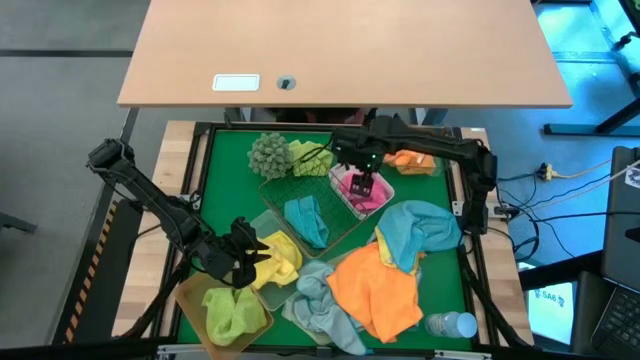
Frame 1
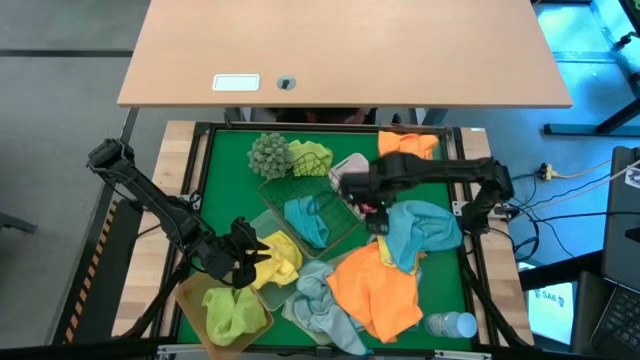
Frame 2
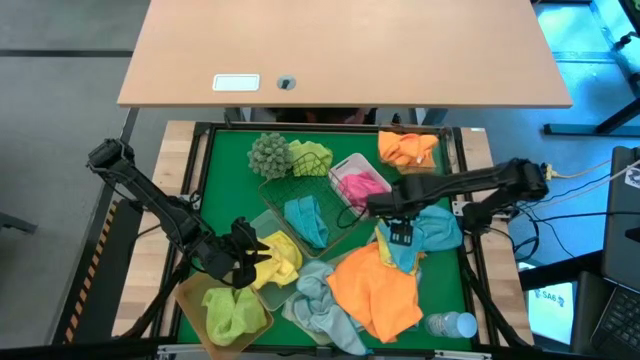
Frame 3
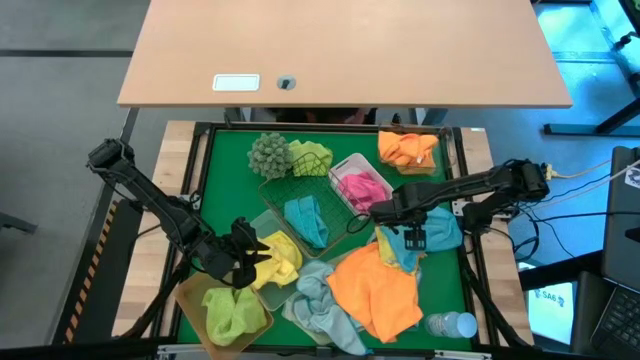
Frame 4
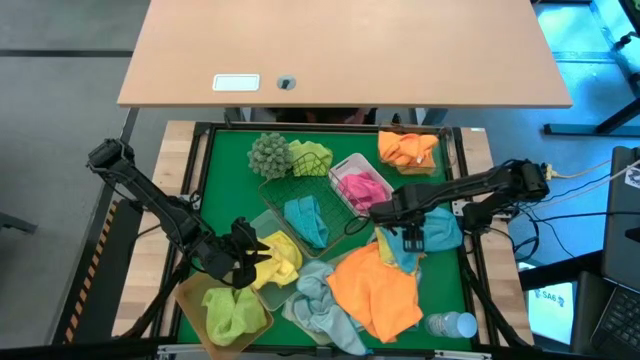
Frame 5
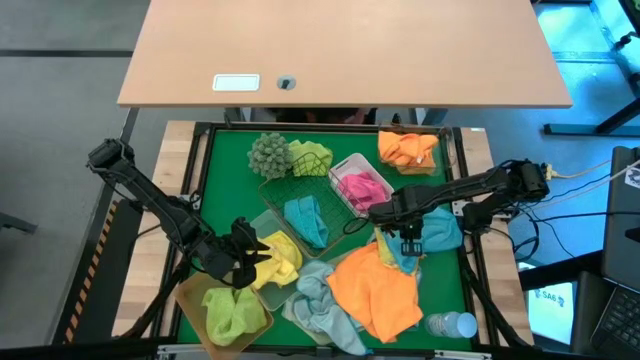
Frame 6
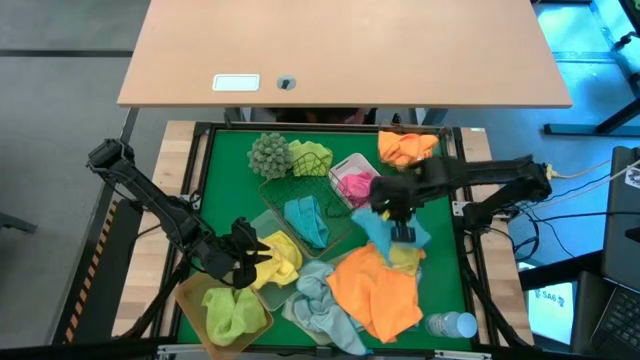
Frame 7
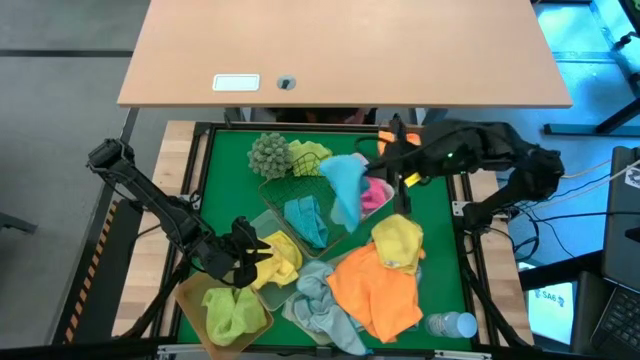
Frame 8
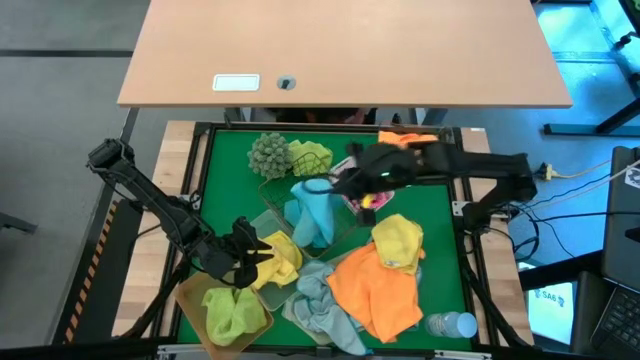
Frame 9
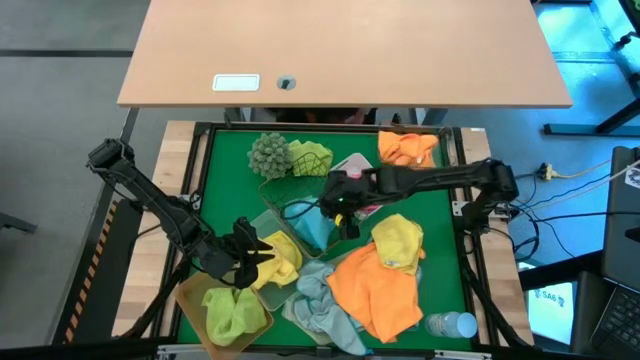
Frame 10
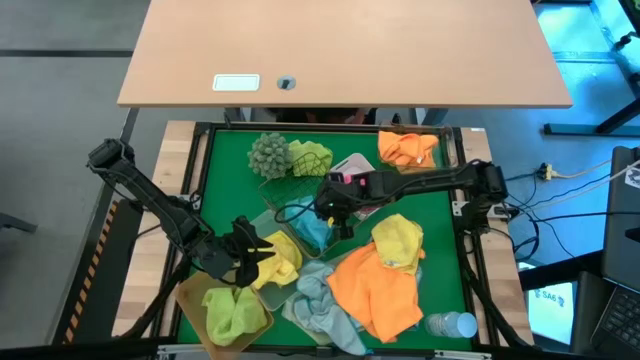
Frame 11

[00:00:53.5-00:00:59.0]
Task: Sort microfiber towel by color & place in baskets
Put the blue towel into the black bin

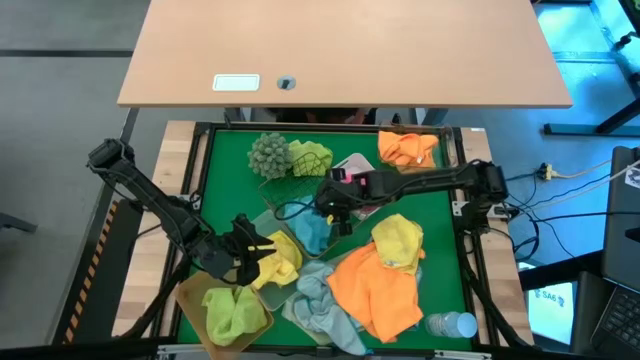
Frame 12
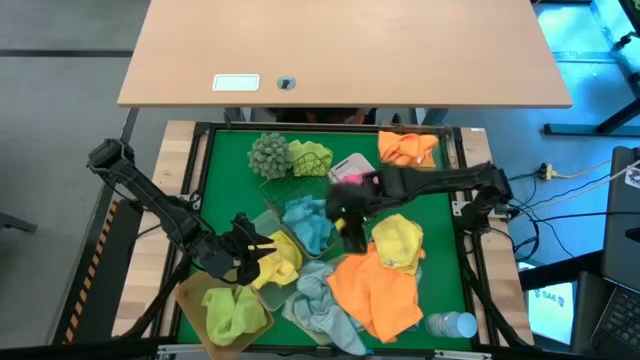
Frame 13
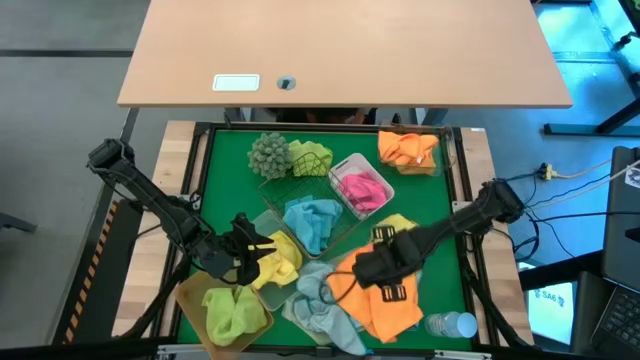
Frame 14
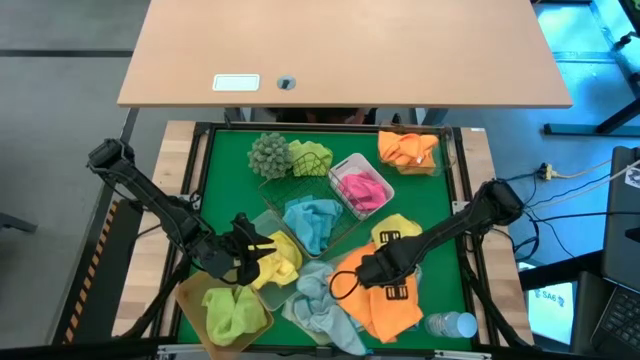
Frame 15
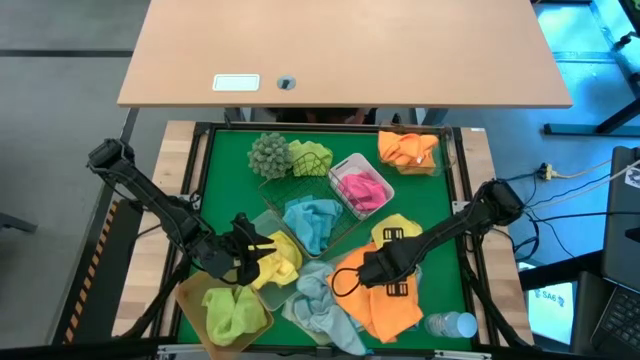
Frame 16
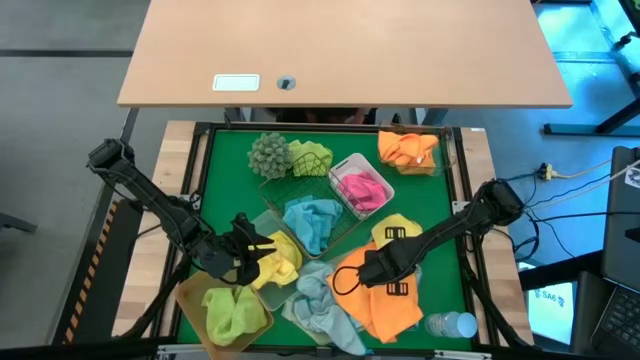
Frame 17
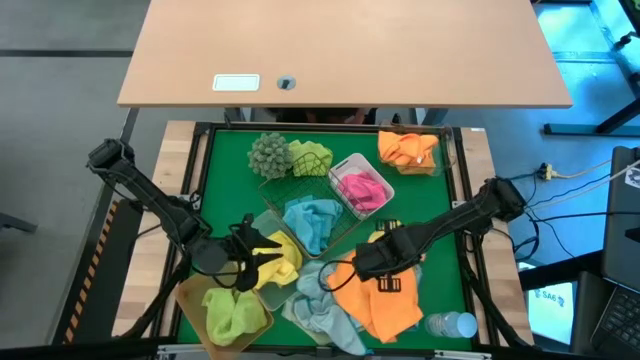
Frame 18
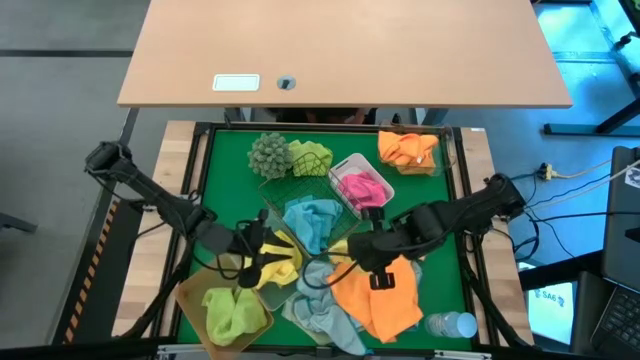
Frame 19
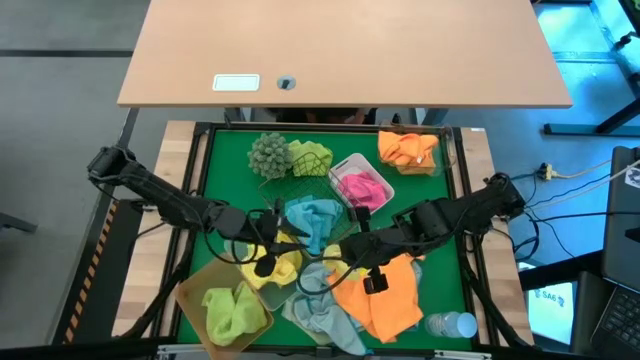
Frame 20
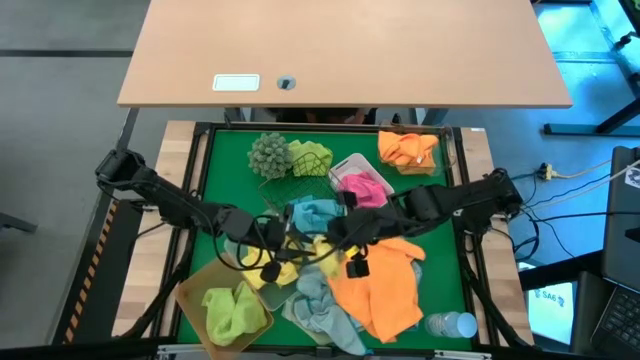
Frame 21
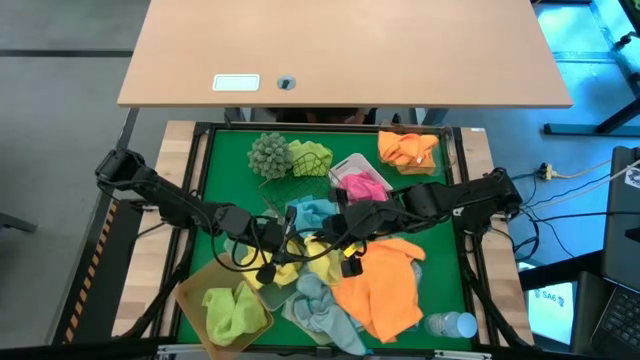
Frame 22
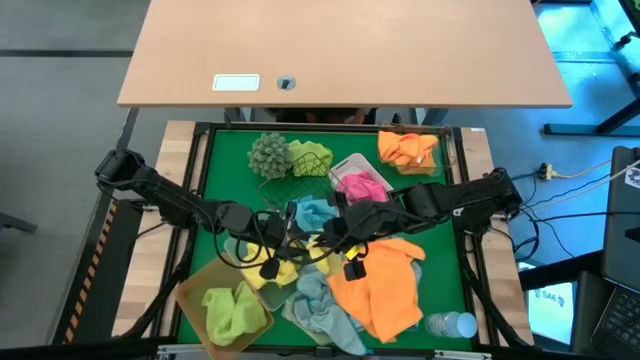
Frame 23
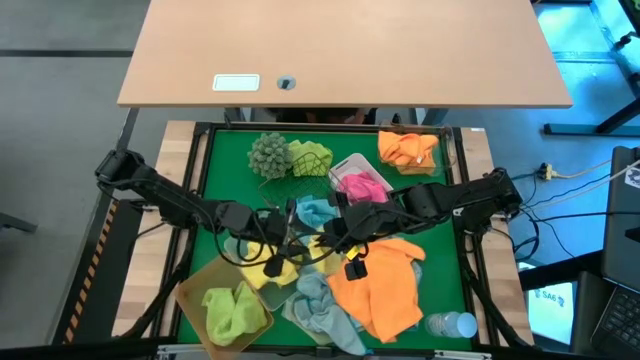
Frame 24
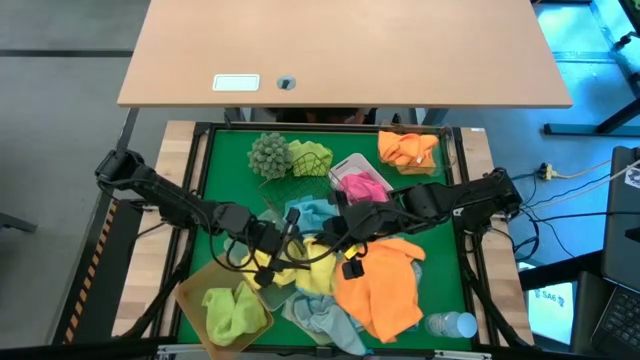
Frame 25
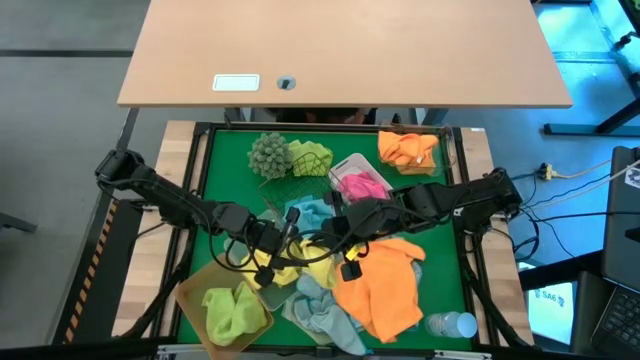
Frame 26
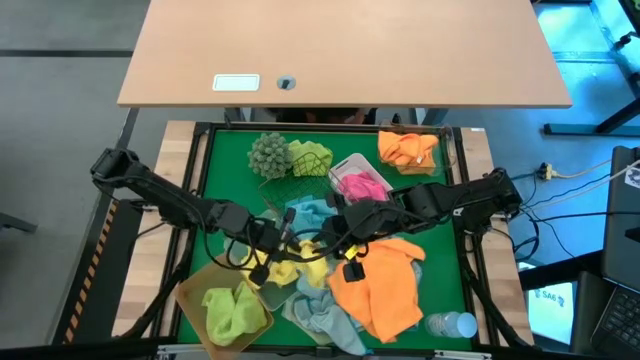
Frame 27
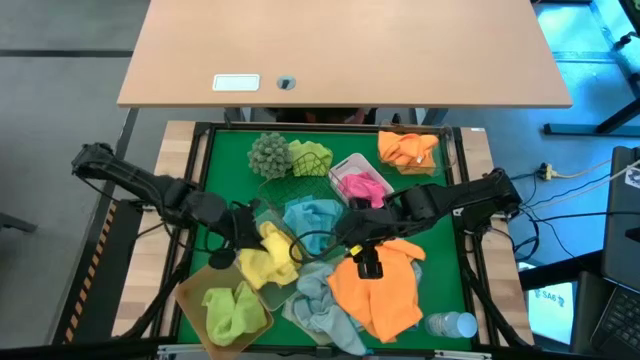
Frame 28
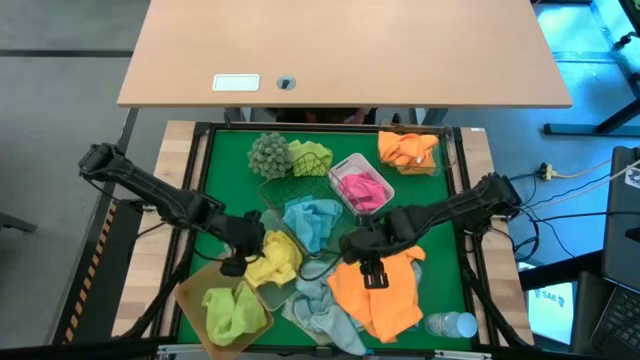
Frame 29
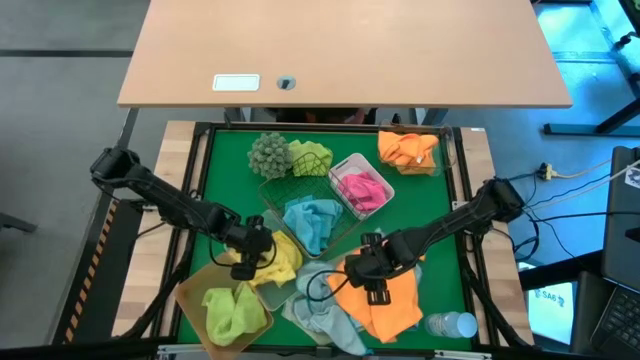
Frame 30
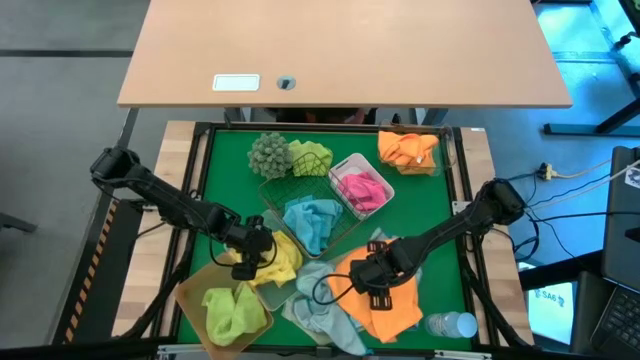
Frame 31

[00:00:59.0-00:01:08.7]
Put the yellow towel into the gray bin

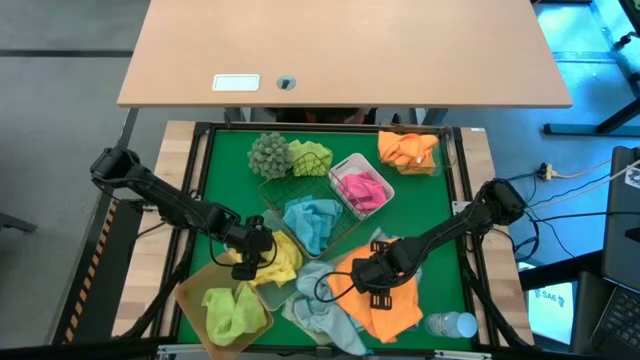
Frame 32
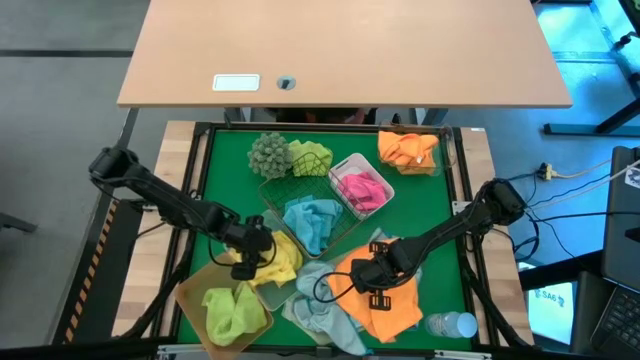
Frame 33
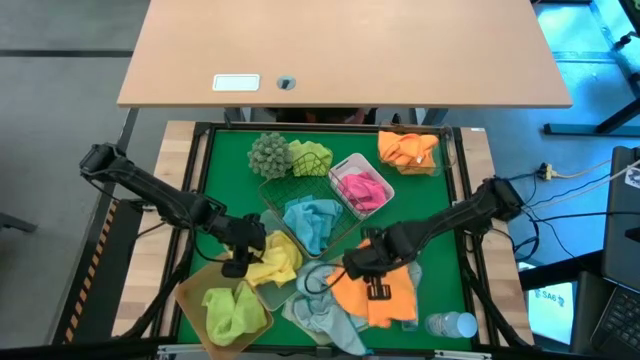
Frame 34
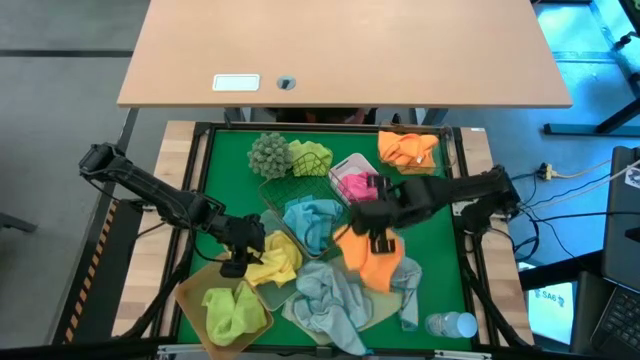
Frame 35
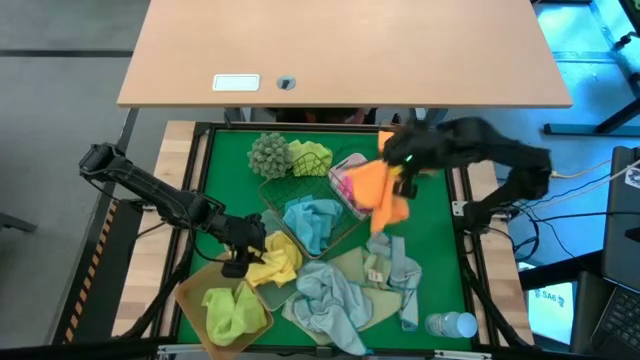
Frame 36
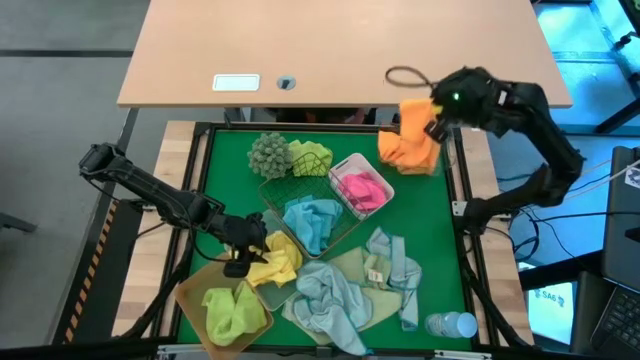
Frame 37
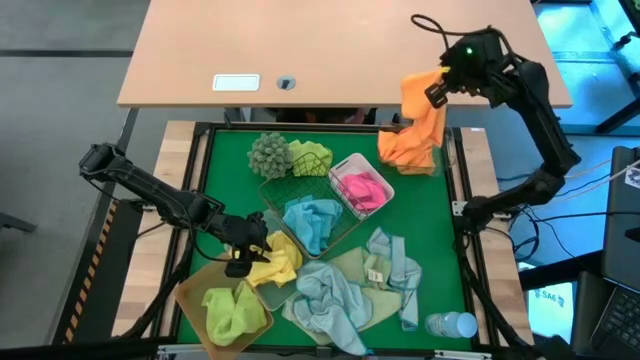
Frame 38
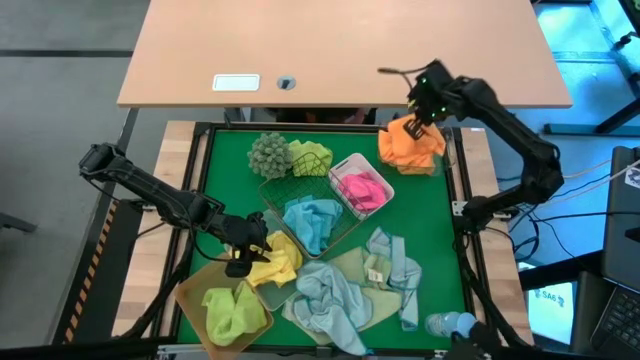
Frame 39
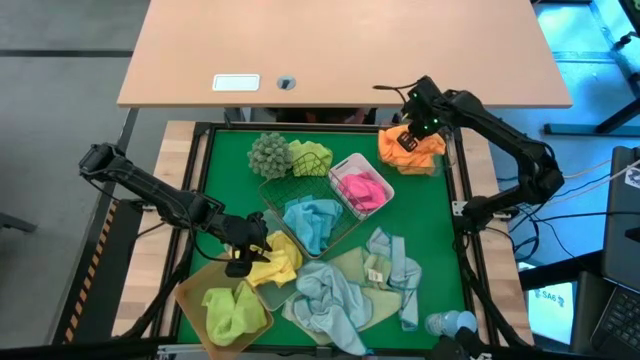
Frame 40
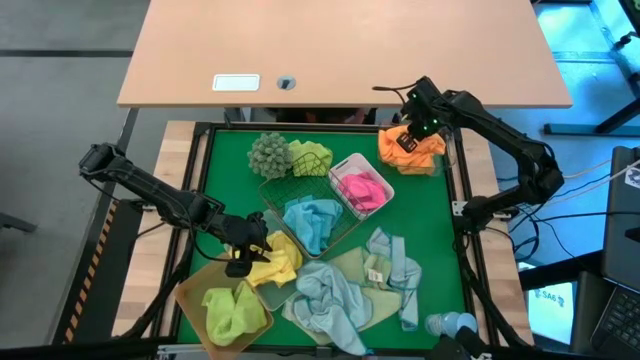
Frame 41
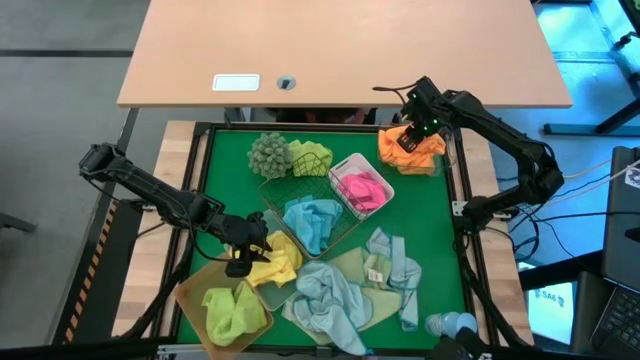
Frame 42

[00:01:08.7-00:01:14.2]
Put the orange towel into the transparent bin
